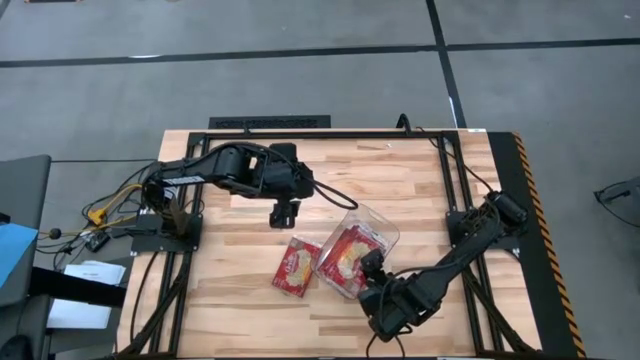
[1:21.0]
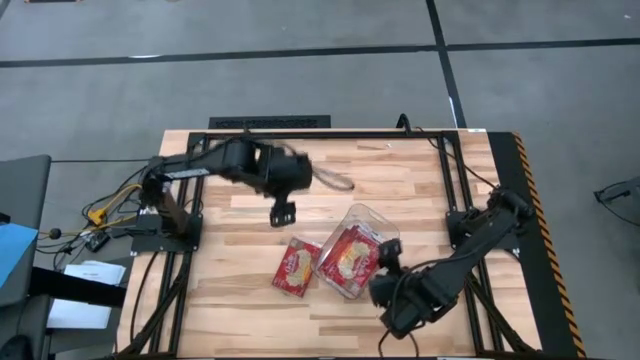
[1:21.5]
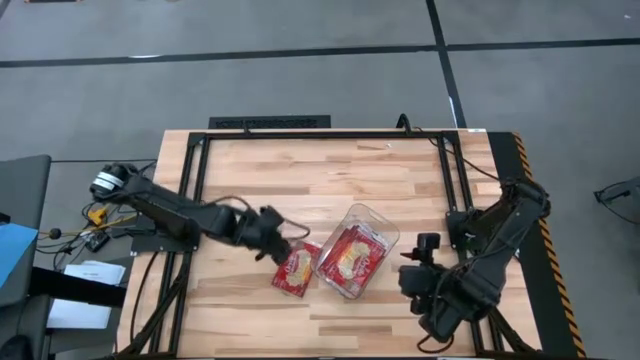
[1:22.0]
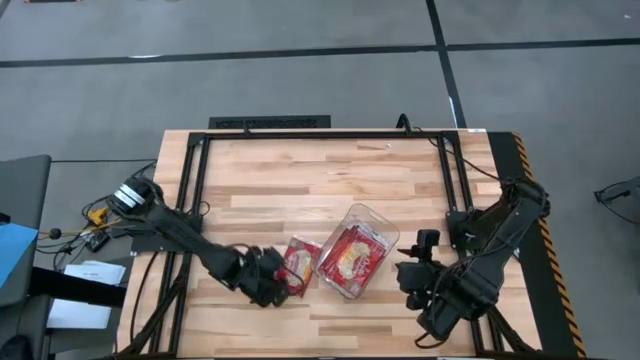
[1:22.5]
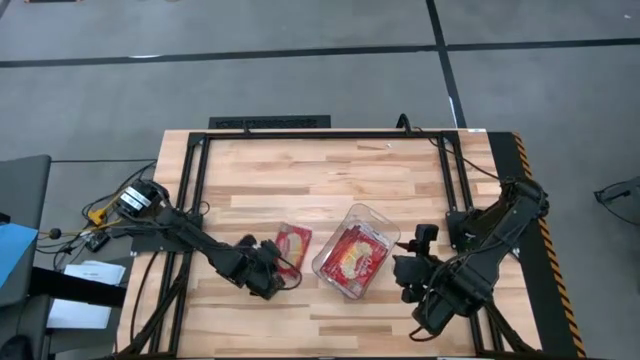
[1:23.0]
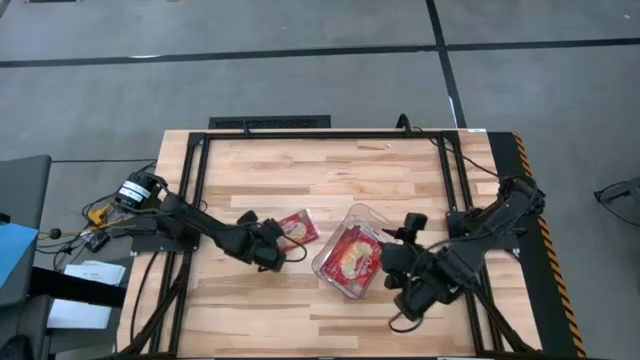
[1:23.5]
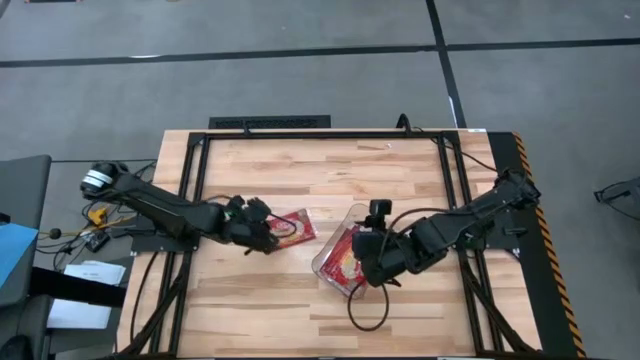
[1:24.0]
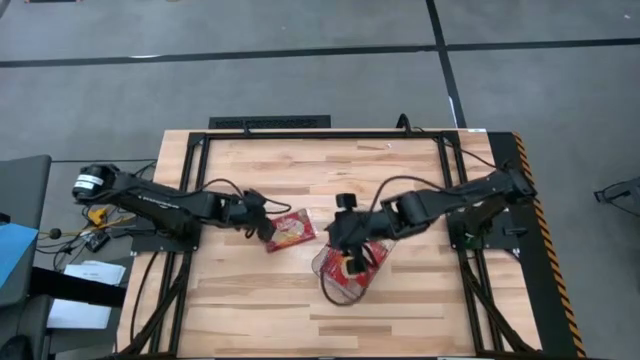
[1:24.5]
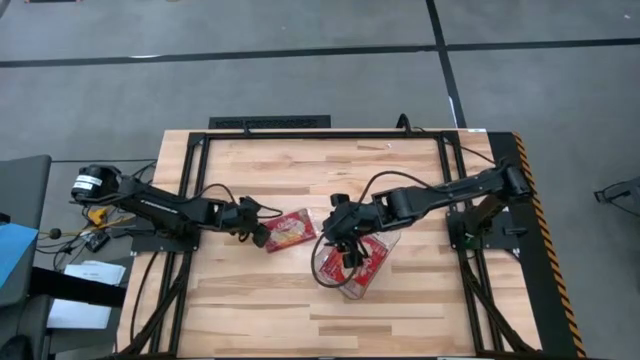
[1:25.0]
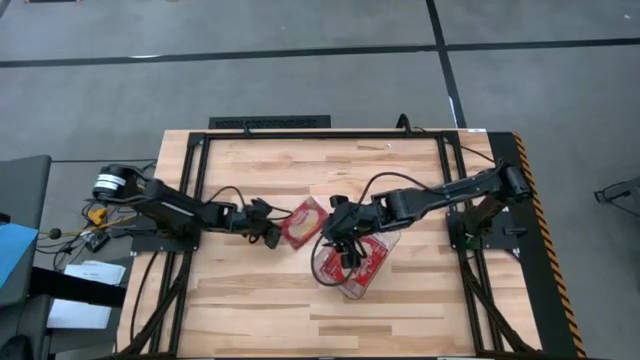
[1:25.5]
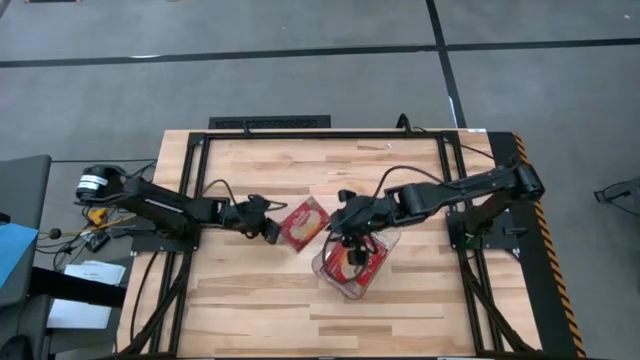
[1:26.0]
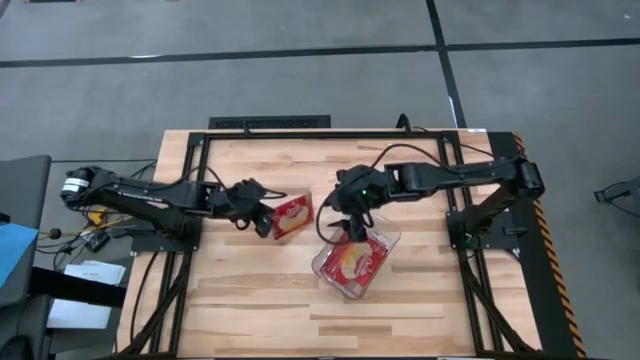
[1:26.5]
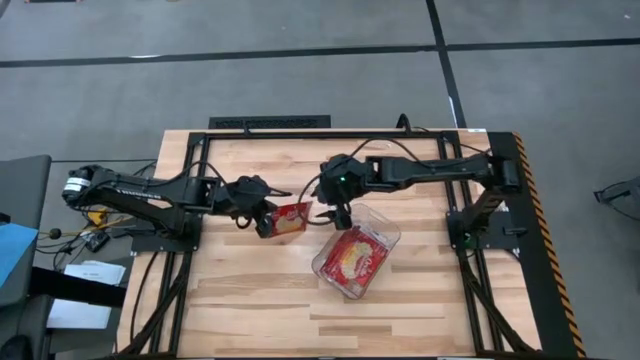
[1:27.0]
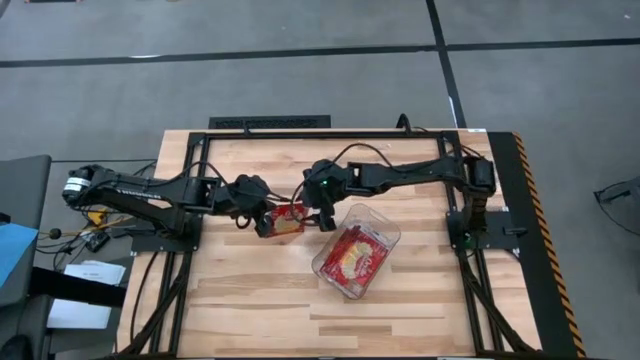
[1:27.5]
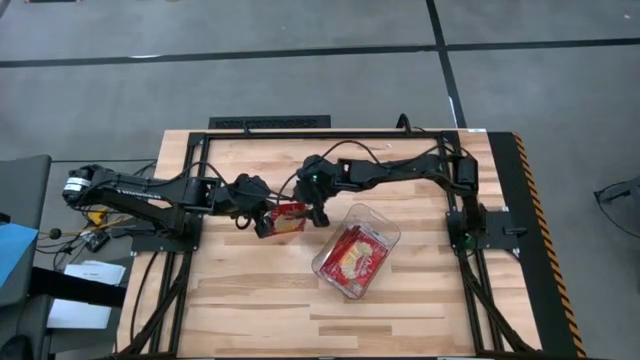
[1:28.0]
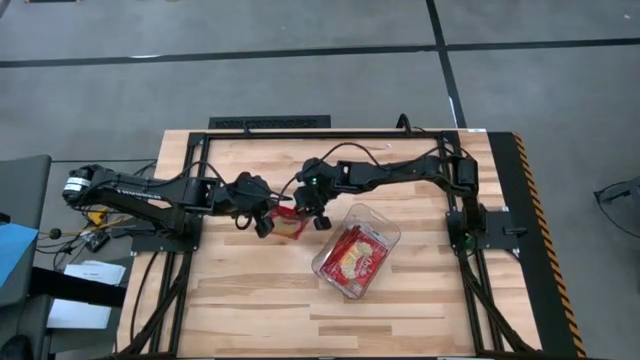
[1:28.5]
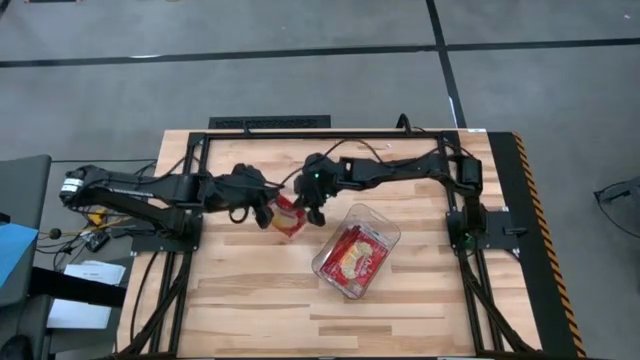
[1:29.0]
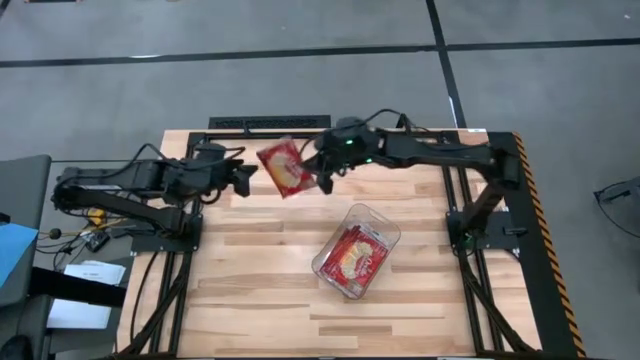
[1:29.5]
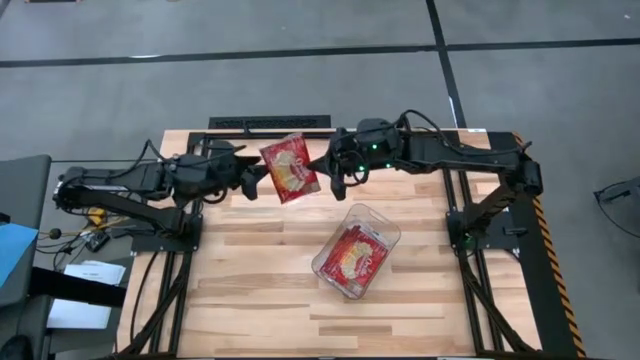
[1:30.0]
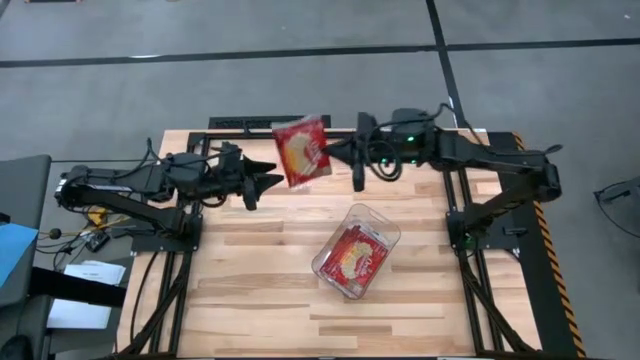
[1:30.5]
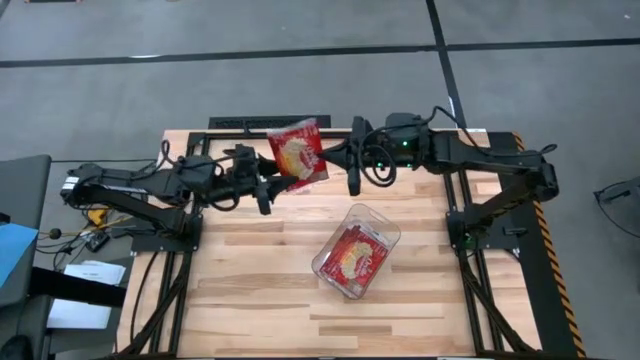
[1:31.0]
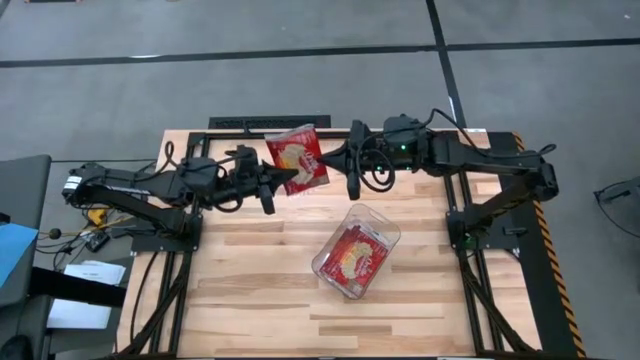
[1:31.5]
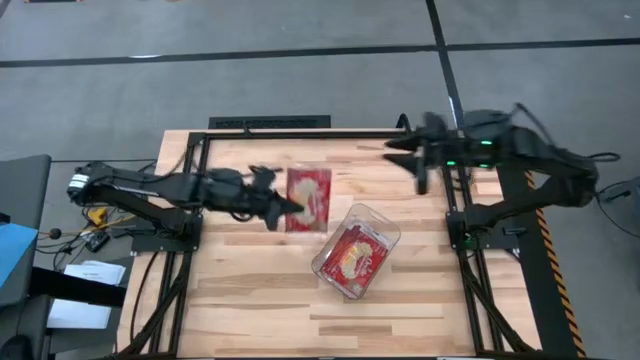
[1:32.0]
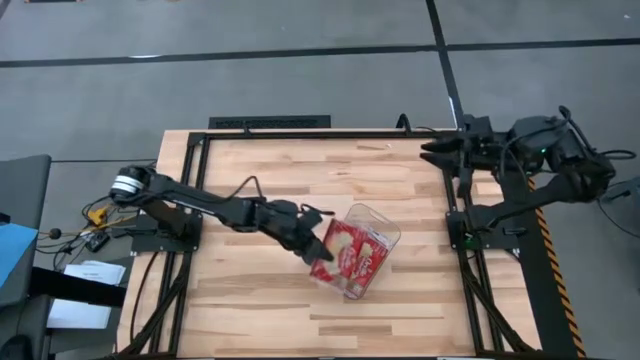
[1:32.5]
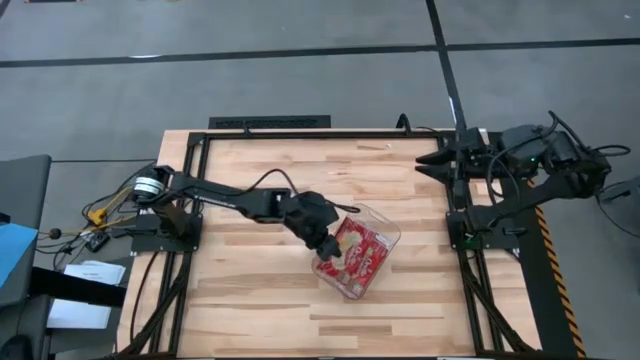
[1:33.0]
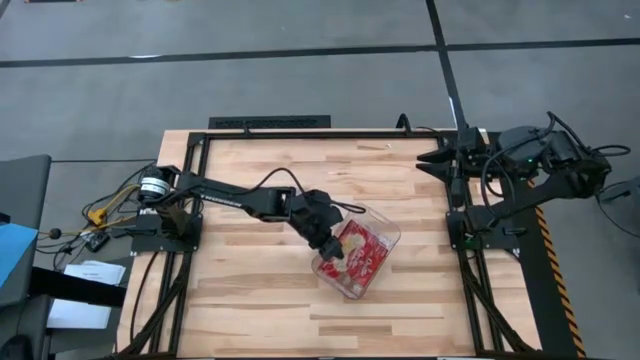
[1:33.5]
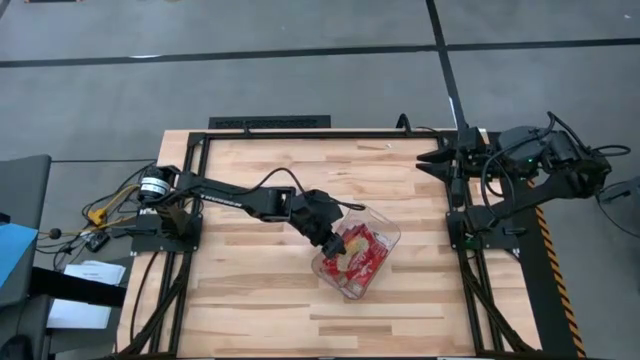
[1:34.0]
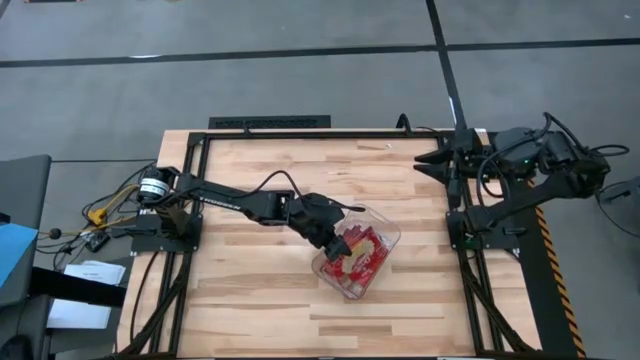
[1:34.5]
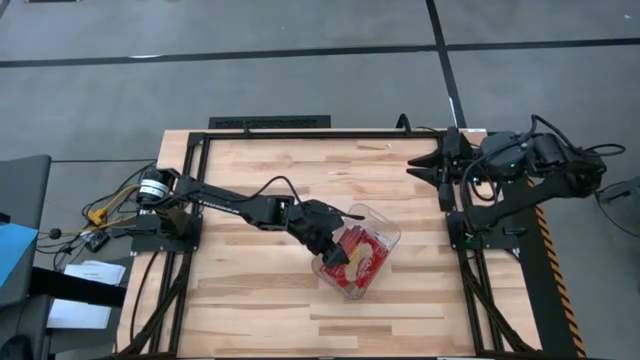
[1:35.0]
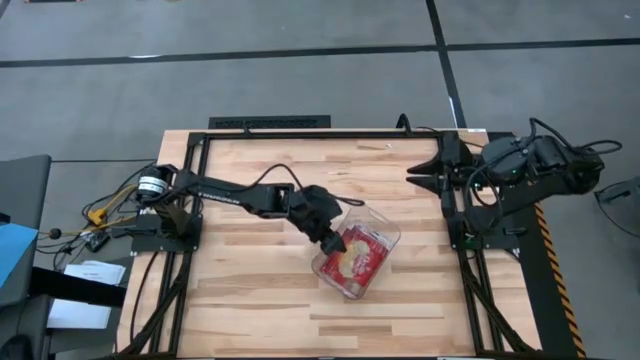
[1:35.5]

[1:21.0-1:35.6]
Task: Sort popcorn bags into baskets
Put the red popcorn packet into the transparent bin

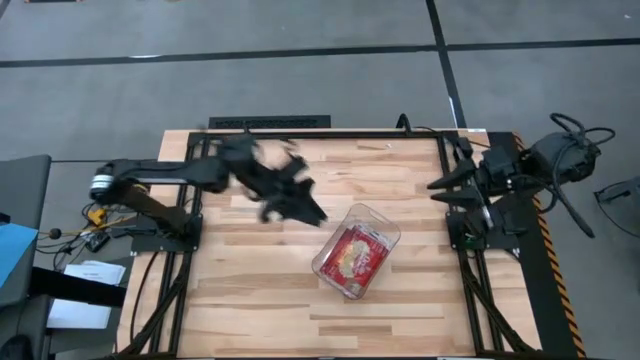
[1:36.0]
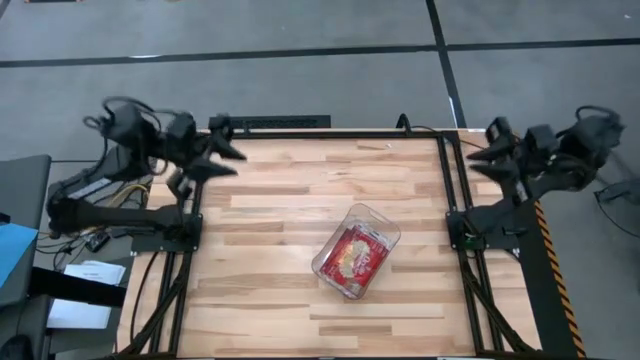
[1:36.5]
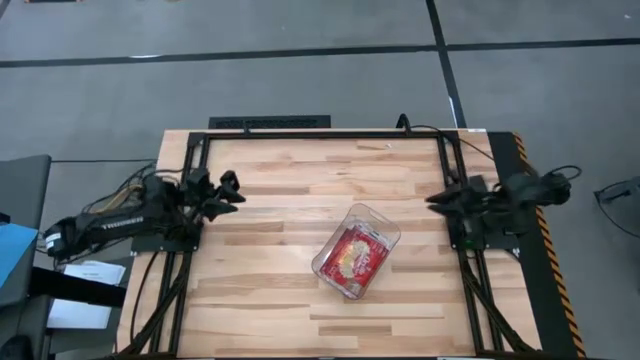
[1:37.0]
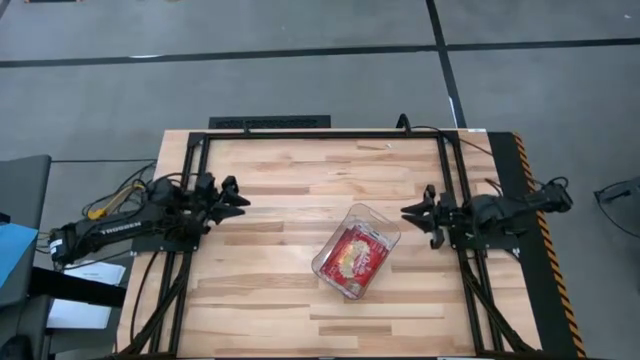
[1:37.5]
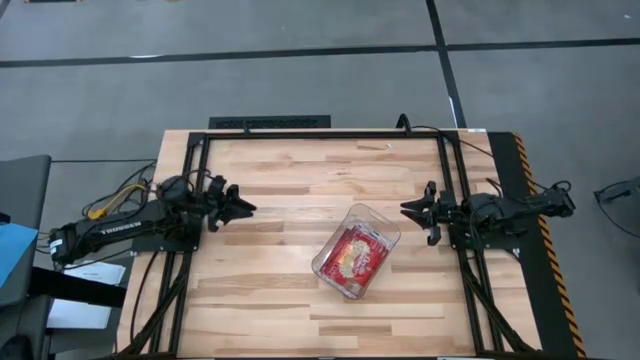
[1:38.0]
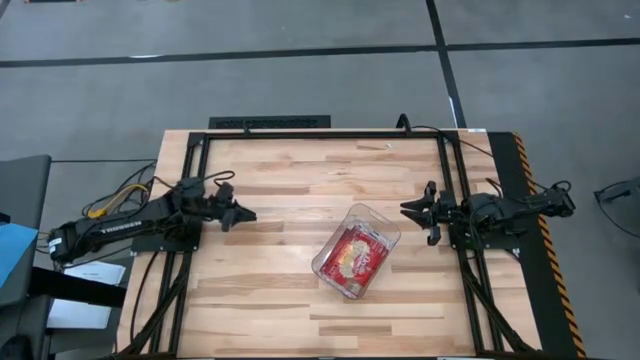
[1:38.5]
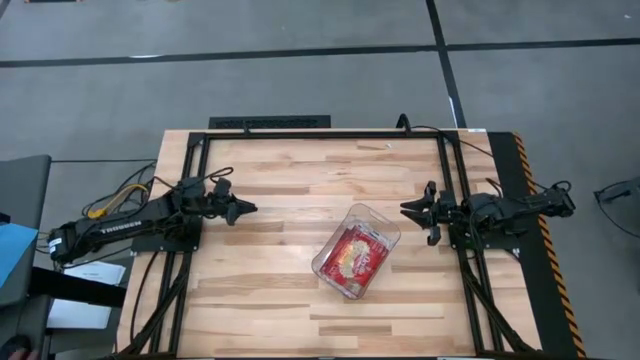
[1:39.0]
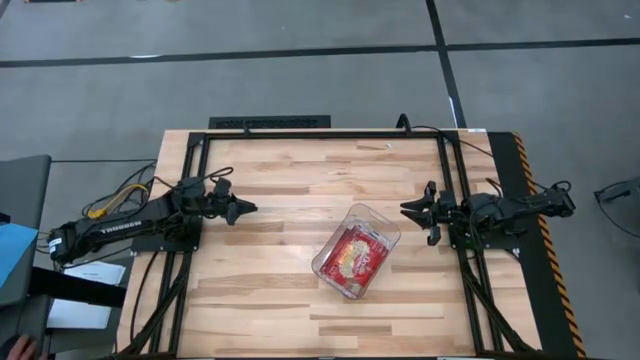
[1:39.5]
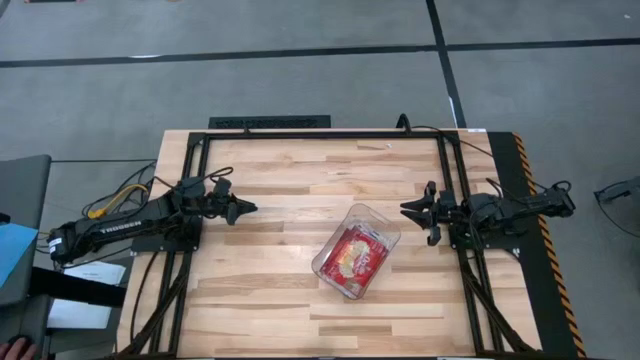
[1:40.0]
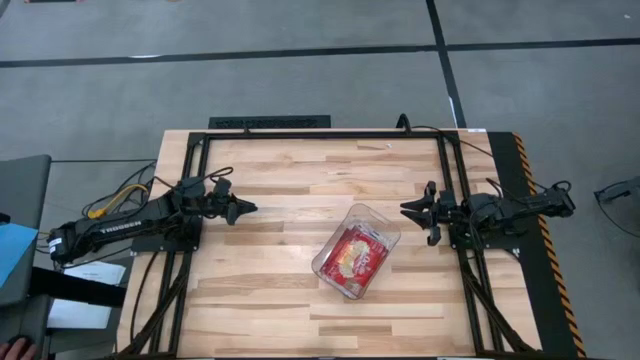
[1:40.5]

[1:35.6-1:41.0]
Return to Home Position
